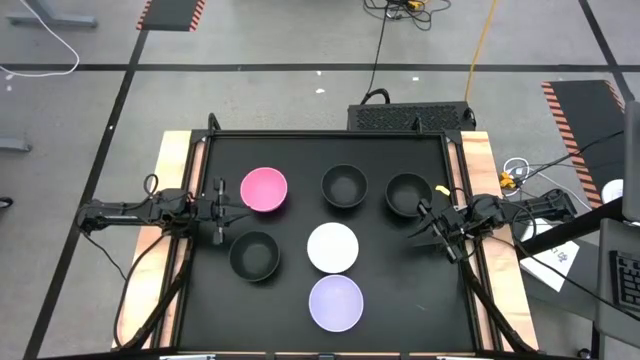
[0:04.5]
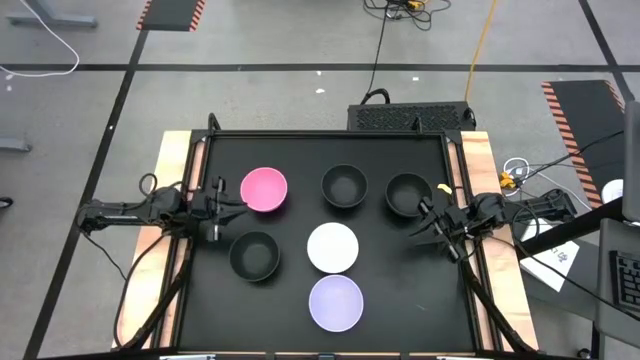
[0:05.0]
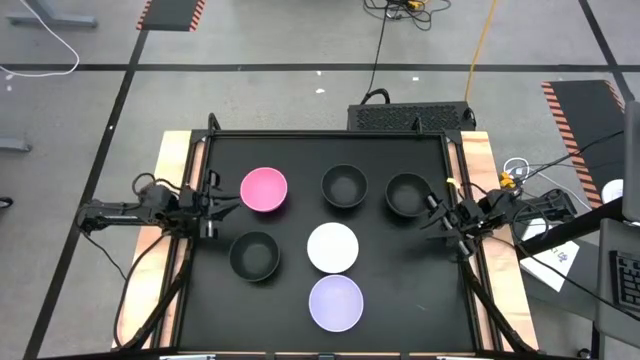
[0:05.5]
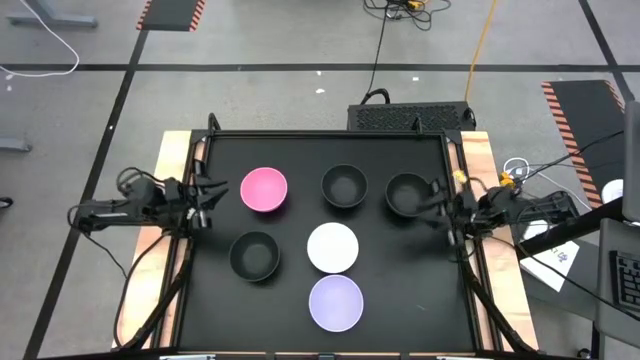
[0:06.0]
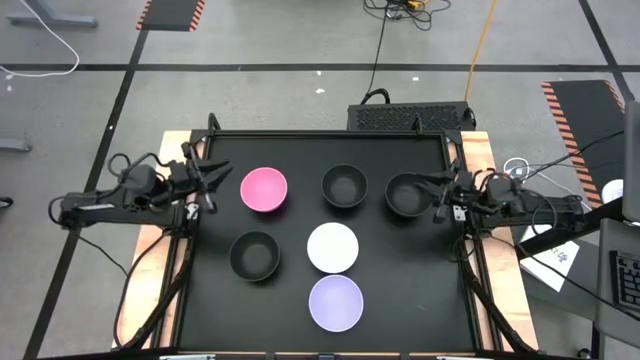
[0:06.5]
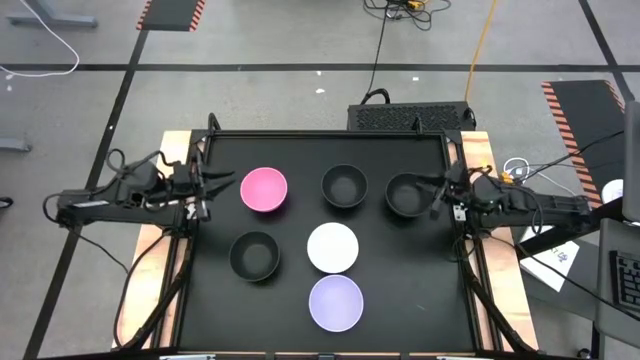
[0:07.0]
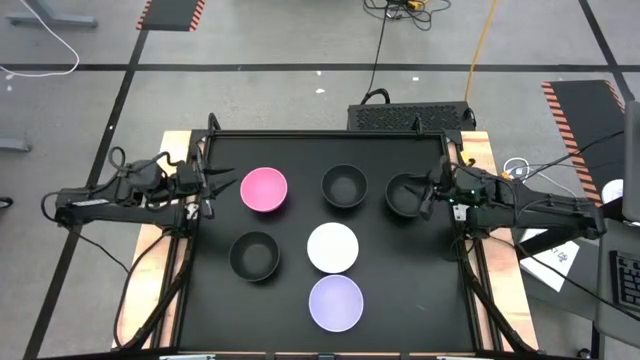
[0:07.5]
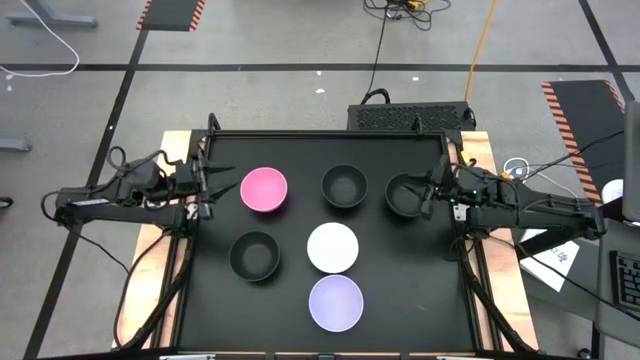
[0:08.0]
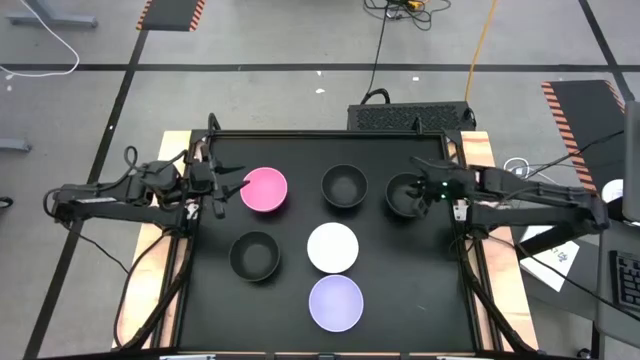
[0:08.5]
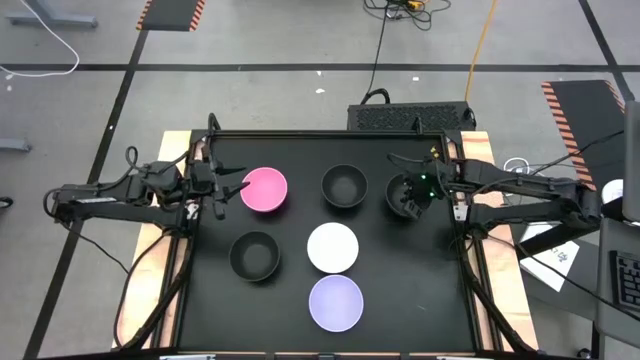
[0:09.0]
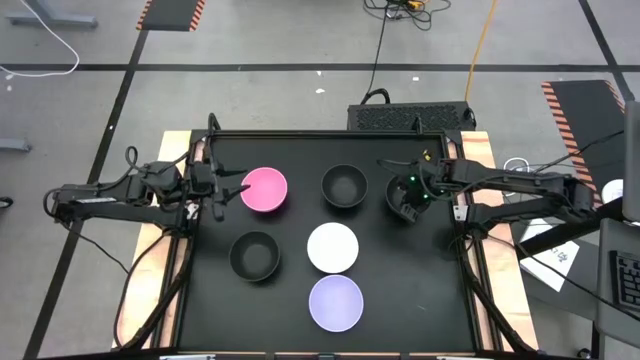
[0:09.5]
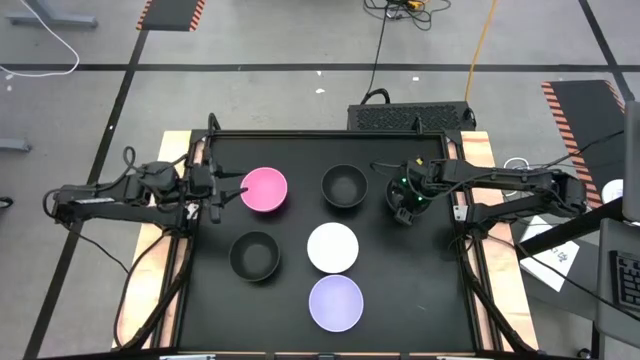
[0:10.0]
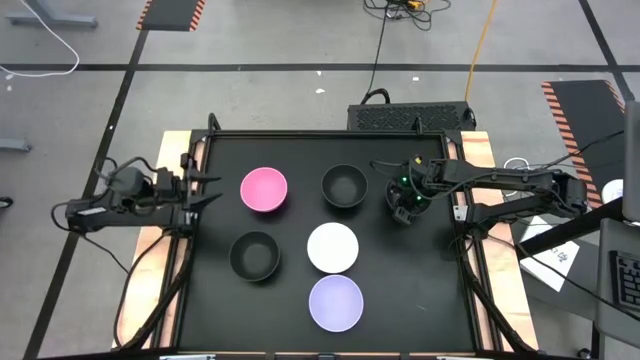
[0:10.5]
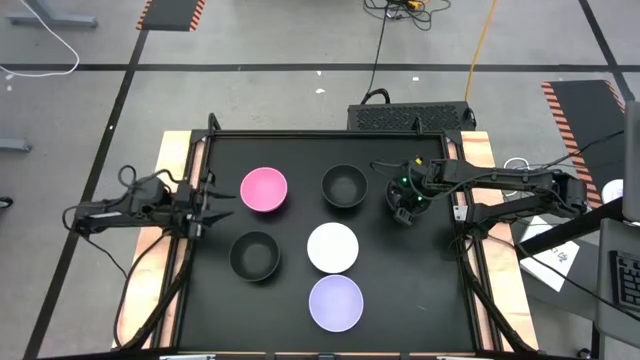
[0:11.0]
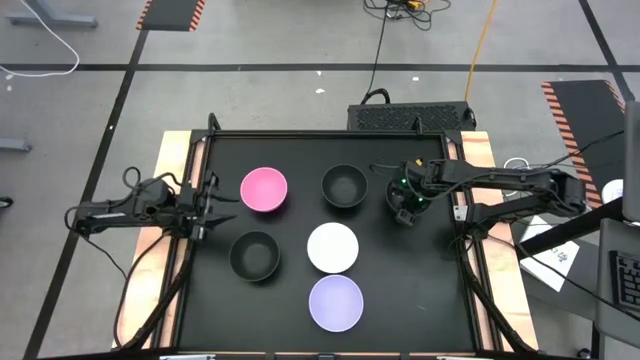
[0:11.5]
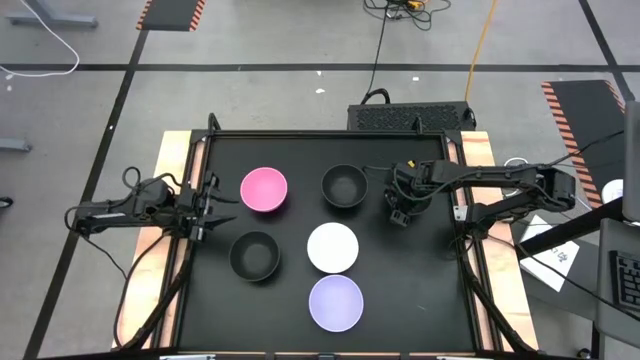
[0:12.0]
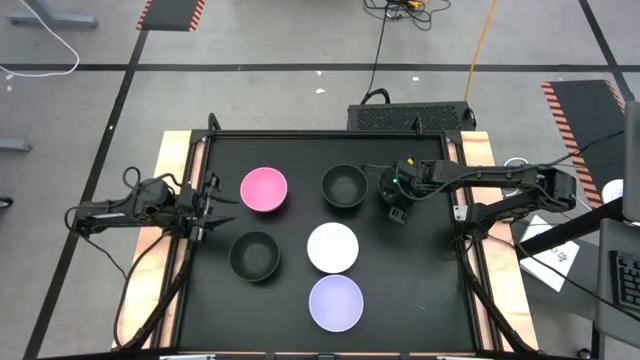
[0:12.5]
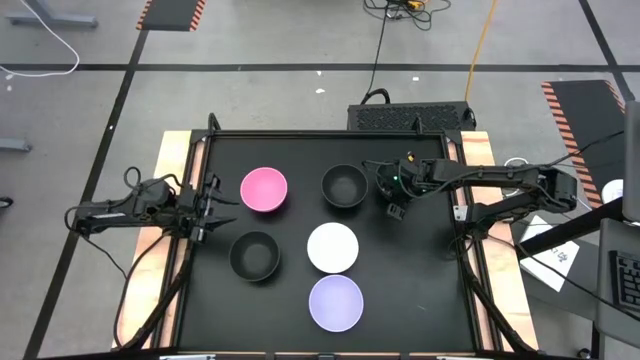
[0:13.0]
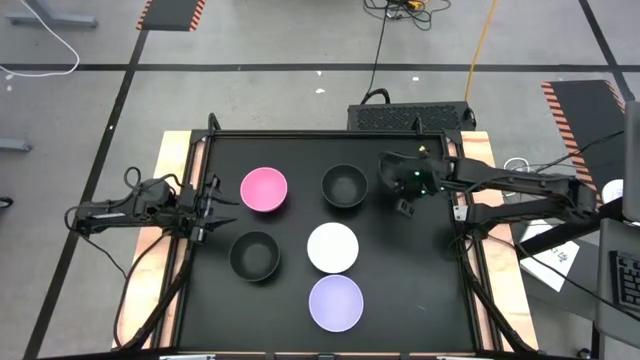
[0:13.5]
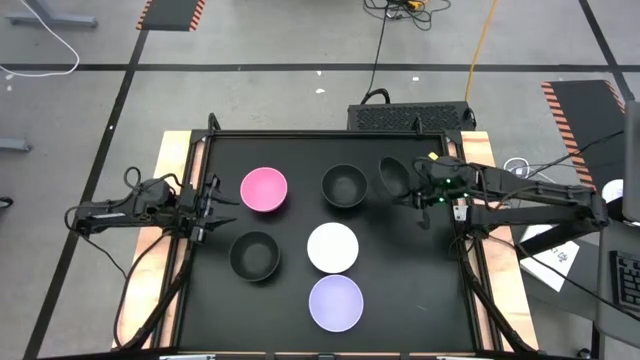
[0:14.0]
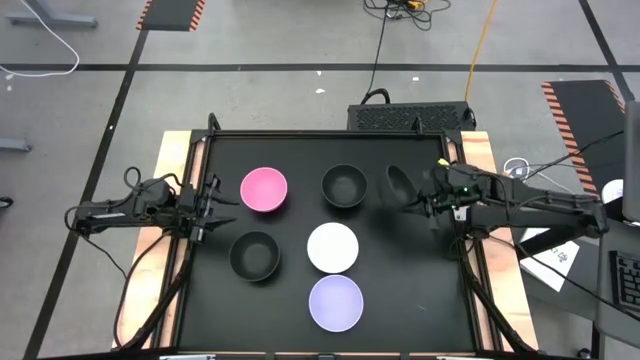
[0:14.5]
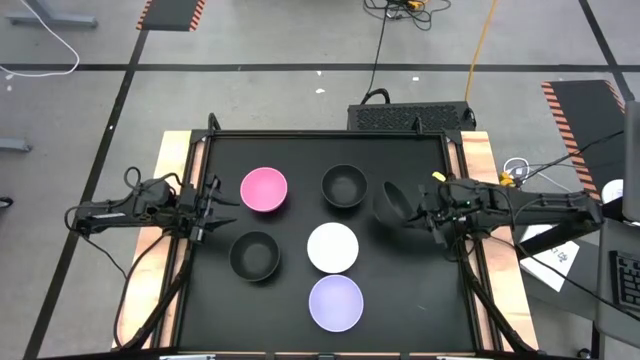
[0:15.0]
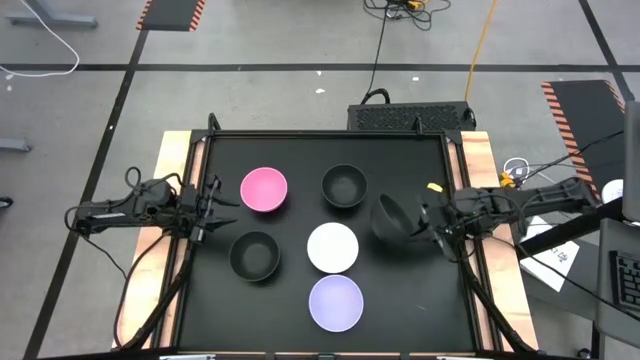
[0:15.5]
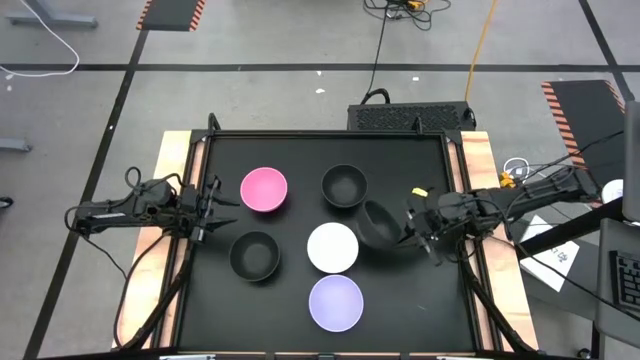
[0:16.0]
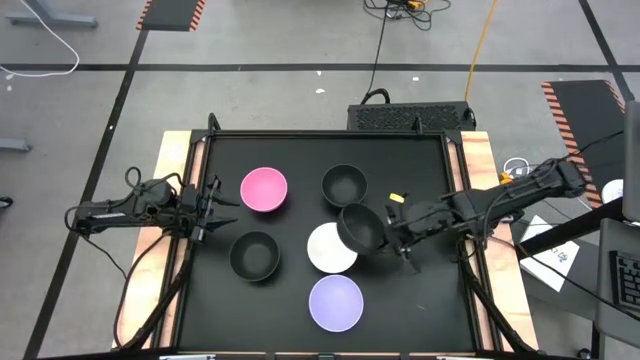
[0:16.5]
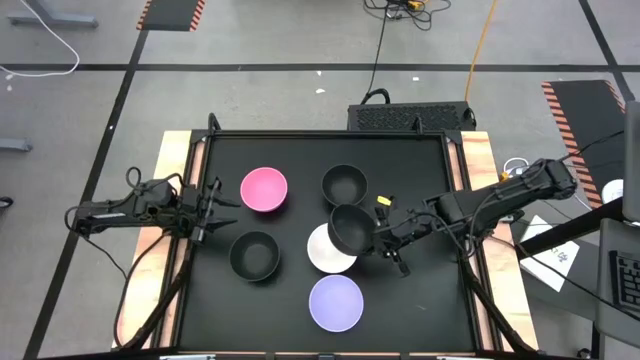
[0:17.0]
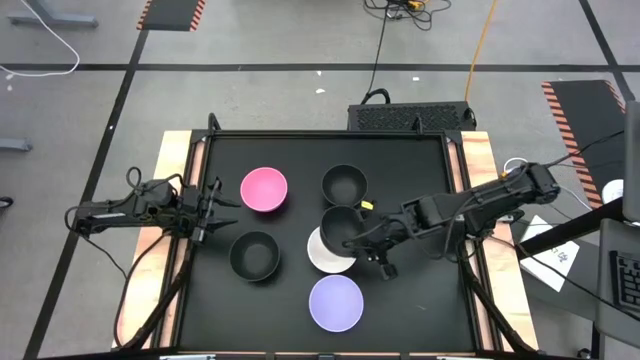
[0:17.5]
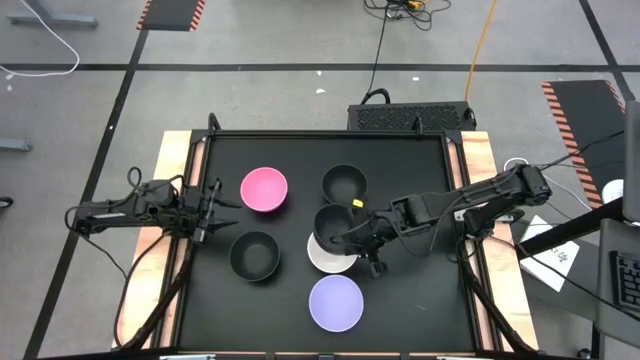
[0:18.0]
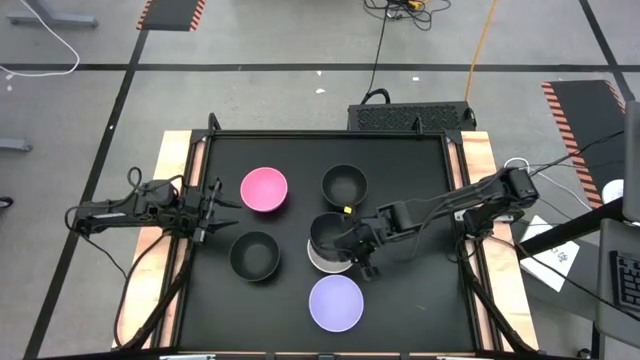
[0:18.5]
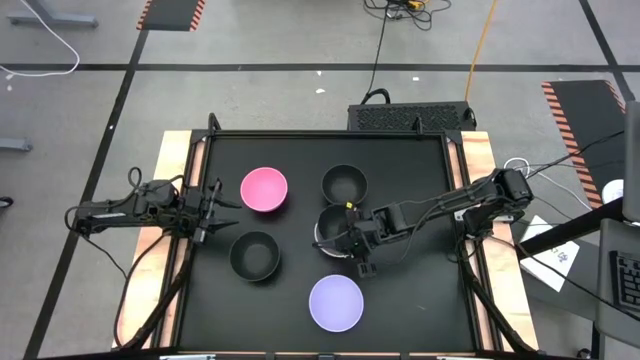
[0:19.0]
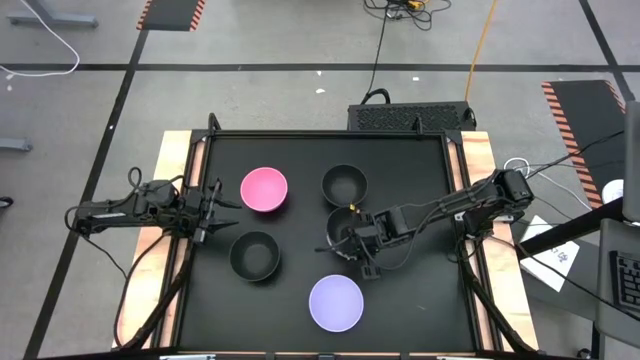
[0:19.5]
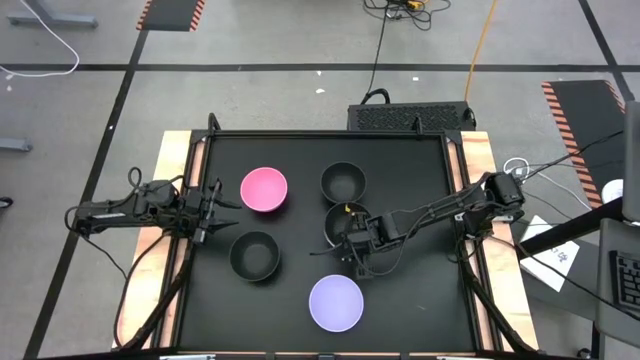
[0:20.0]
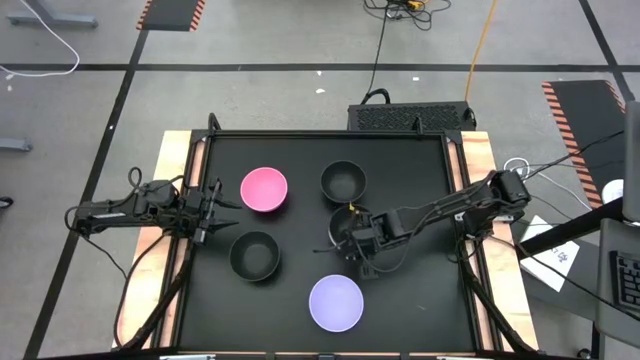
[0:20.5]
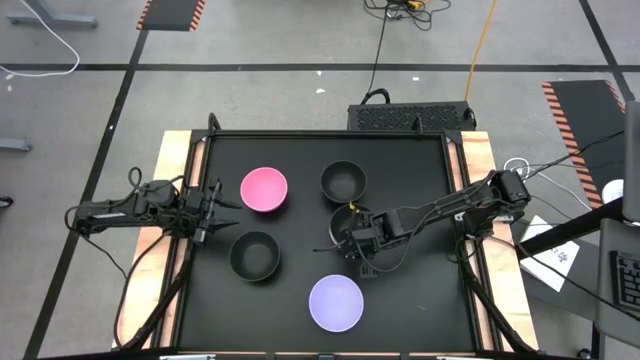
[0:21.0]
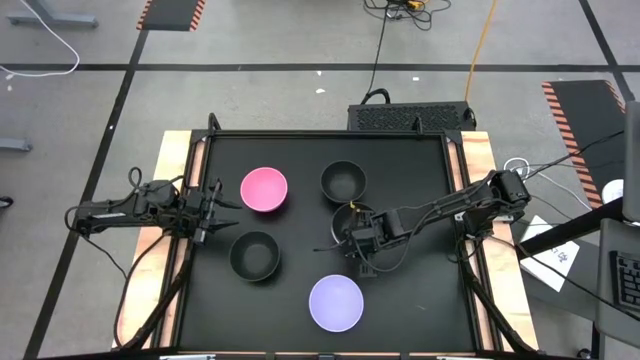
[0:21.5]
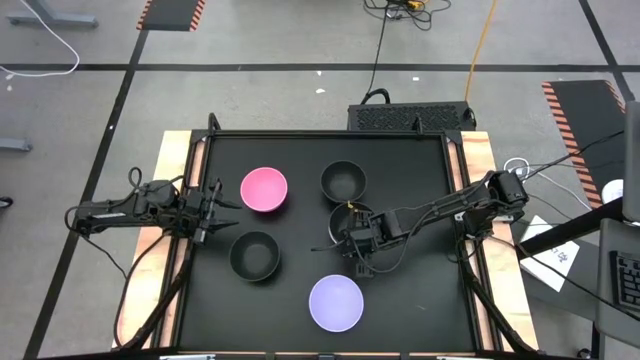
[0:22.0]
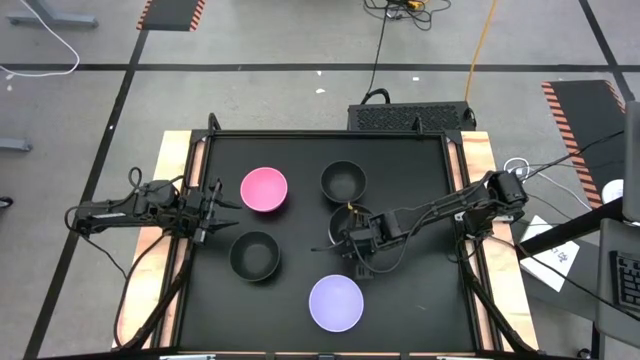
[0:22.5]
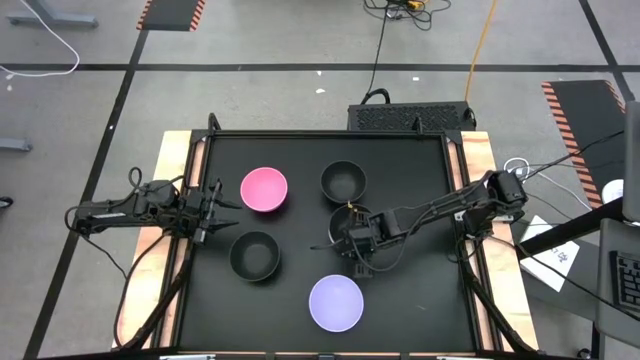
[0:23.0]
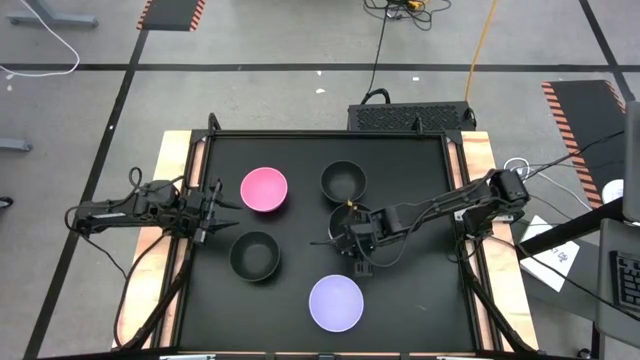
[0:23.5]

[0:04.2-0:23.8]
Task: Nest bowls inside each other
Stack the right black bowl on top of the white bowl
